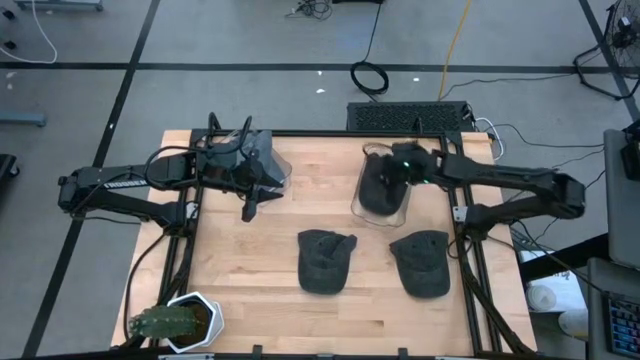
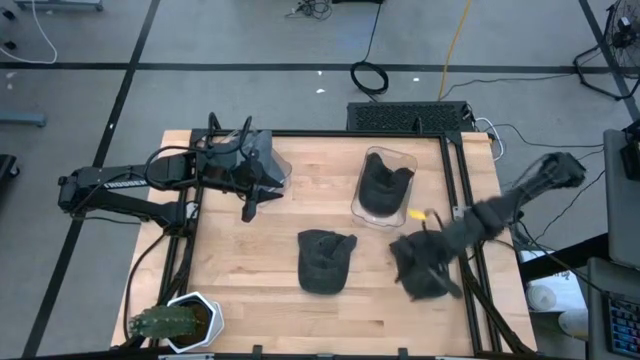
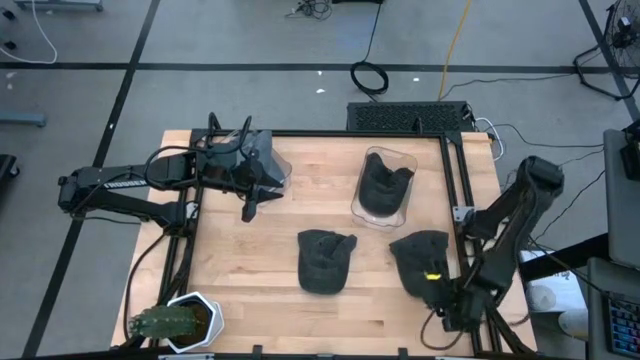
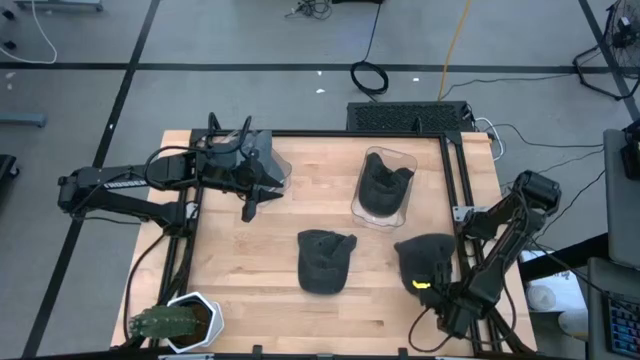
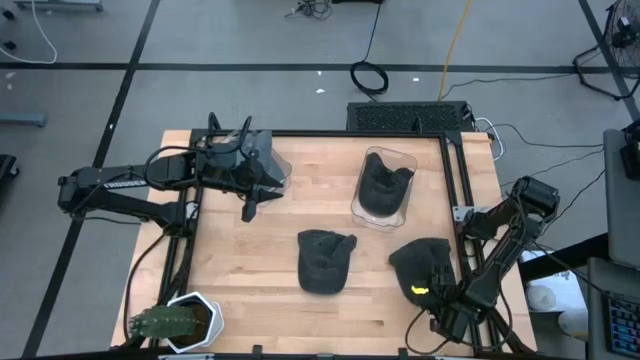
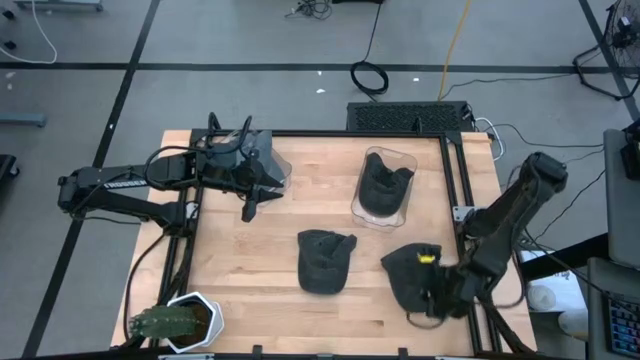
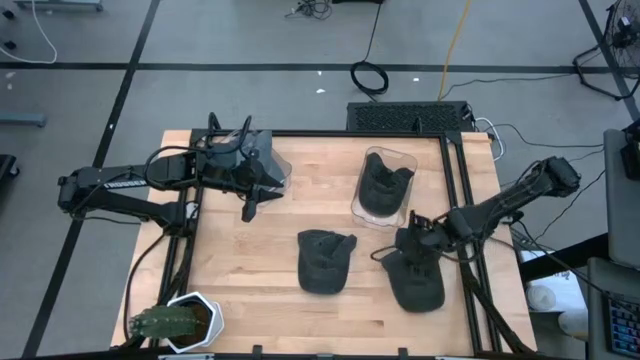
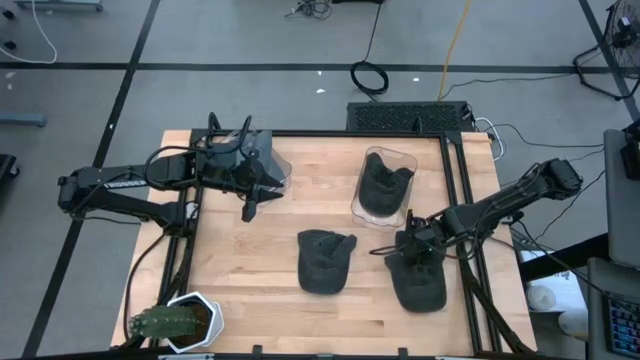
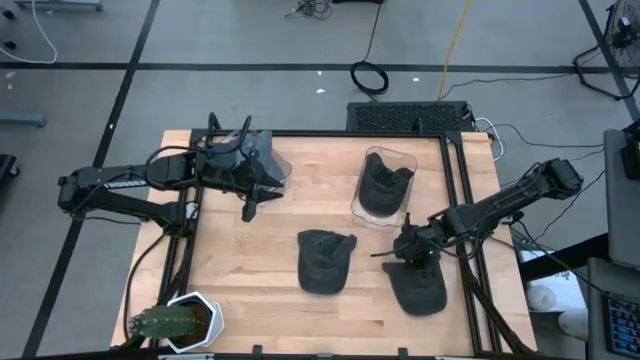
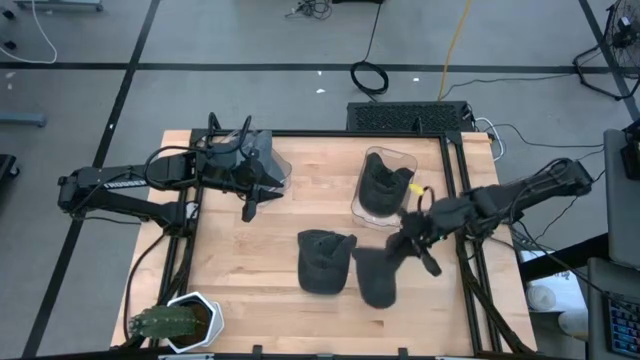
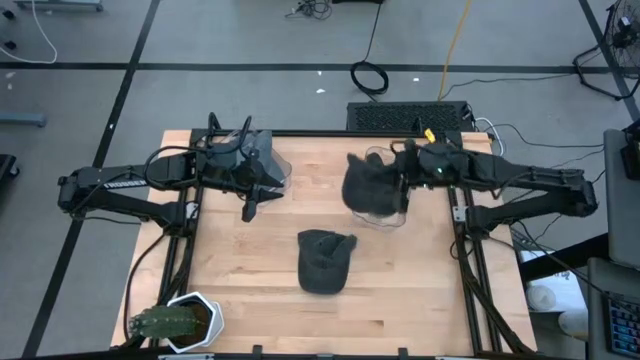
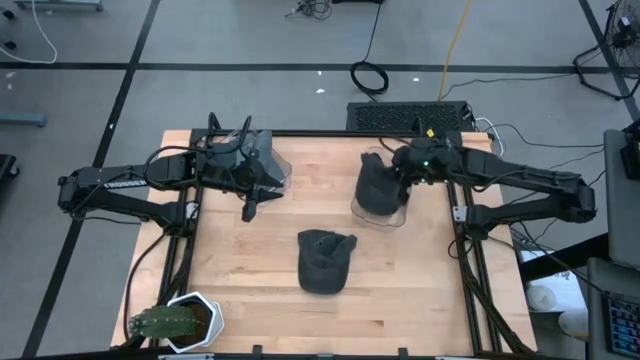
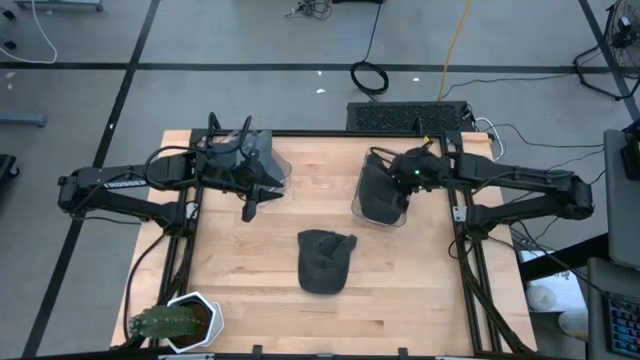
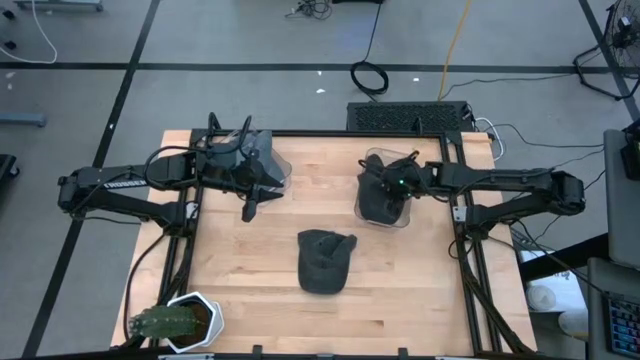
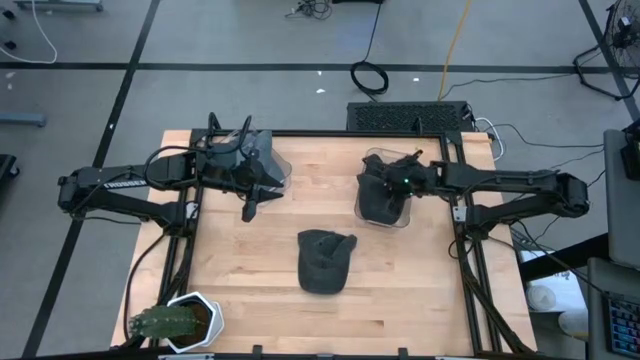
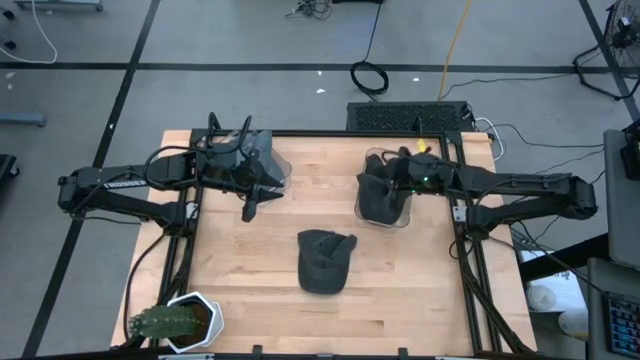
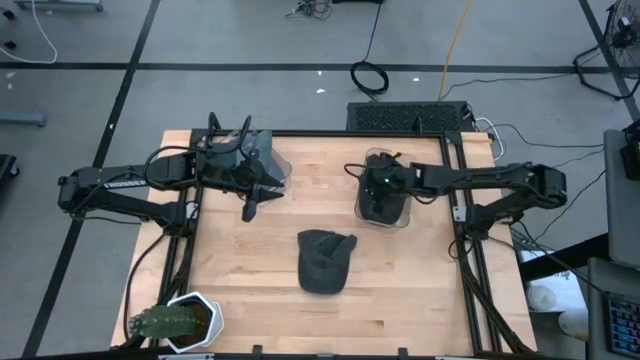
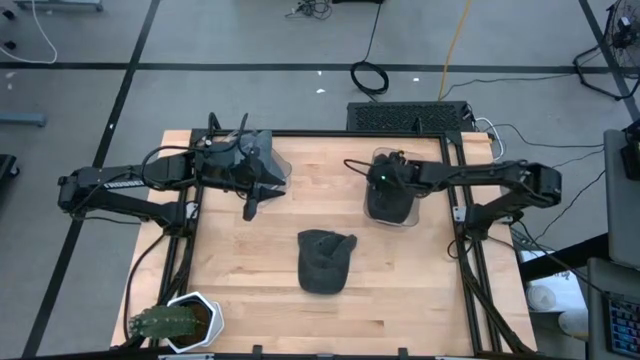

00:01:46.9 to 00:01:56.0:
Task: Pick & Place hat
Put the right black cap into the right transparent bin

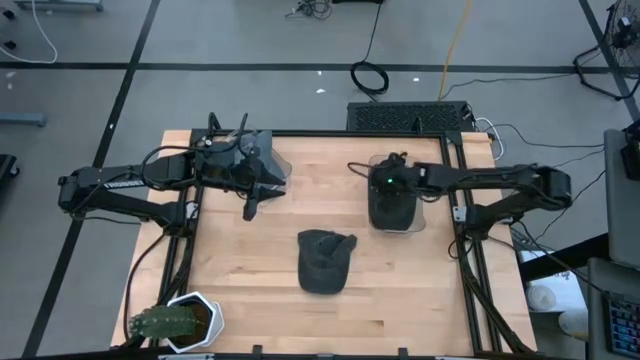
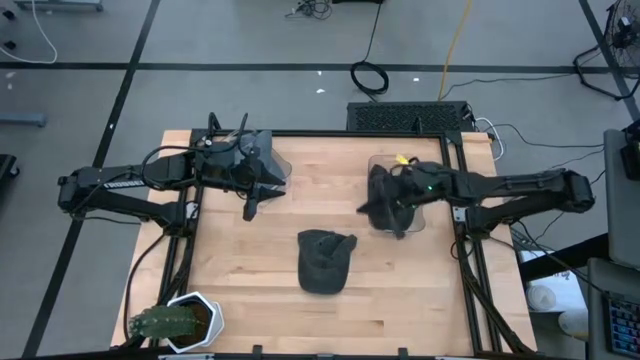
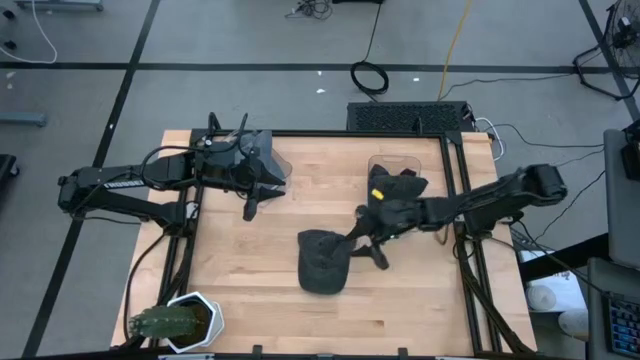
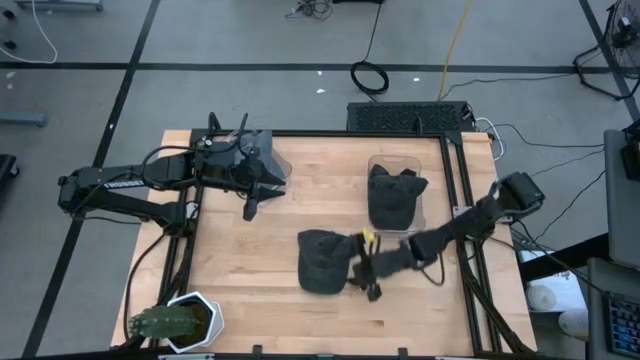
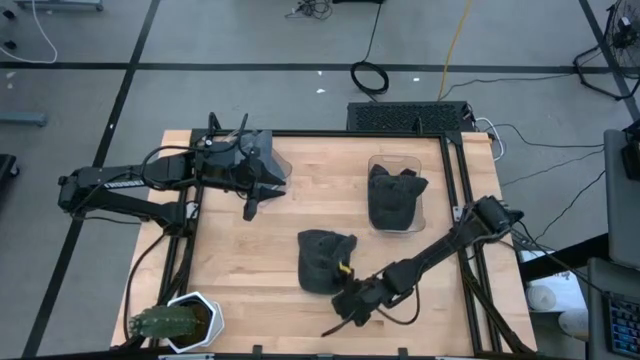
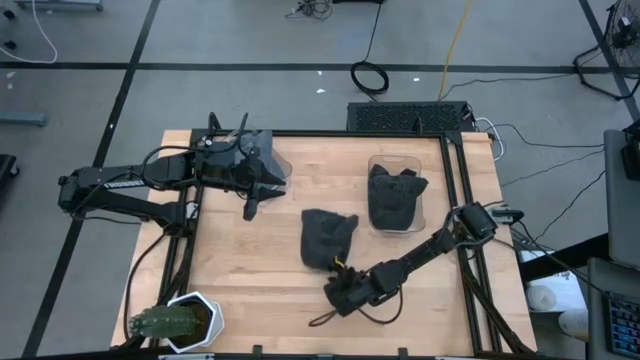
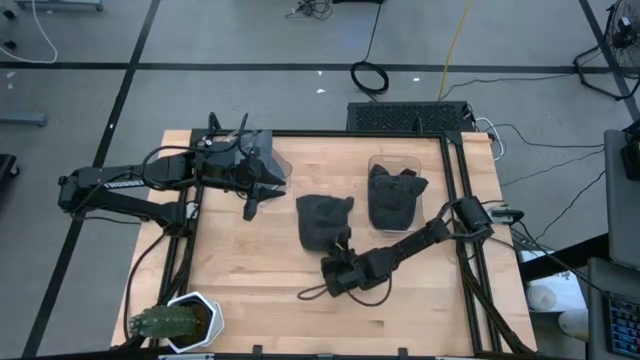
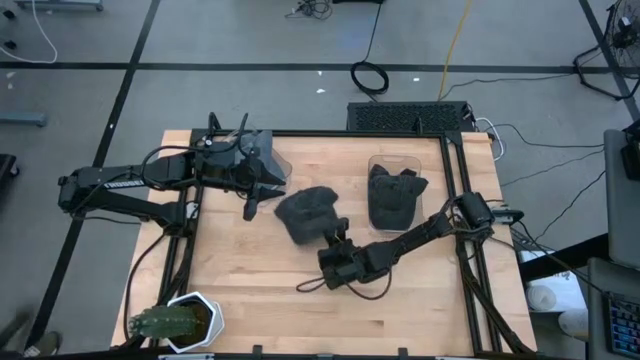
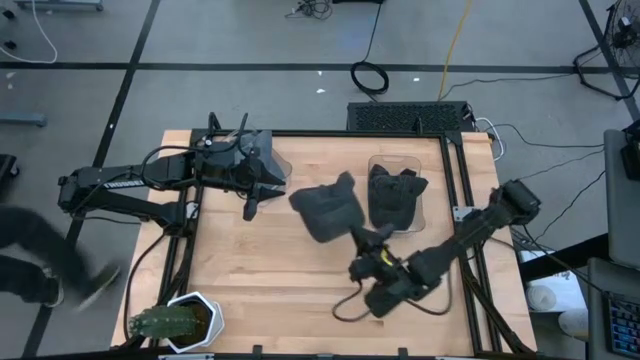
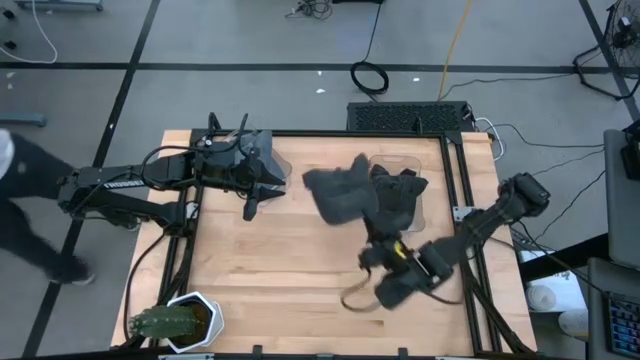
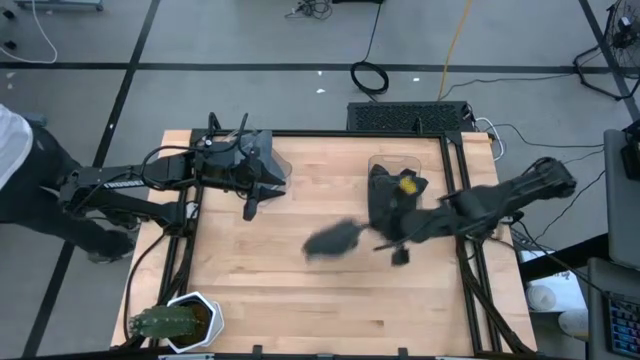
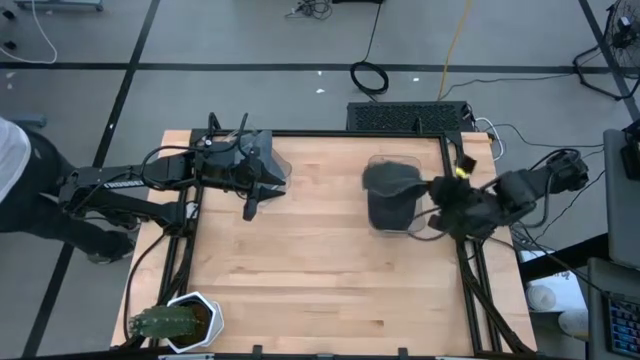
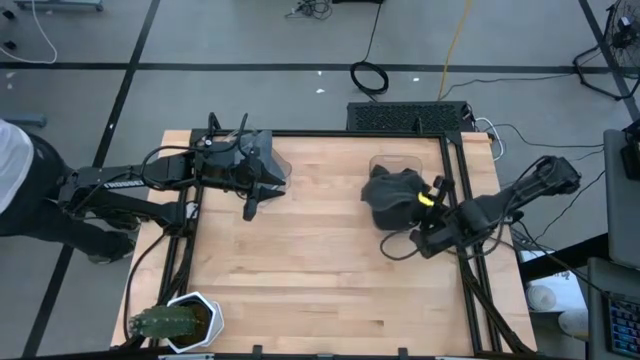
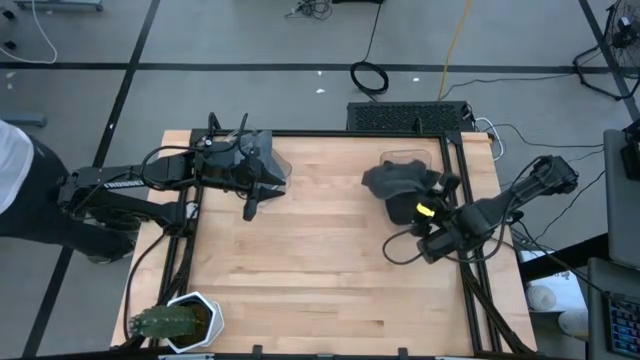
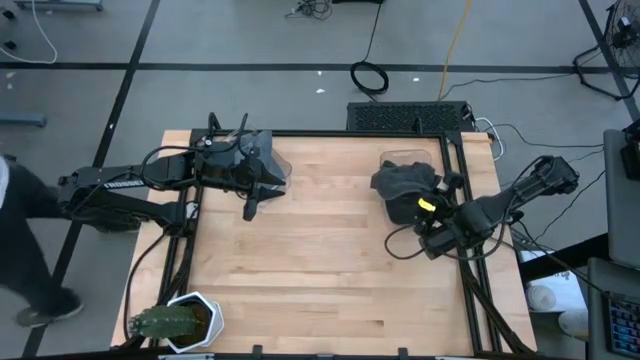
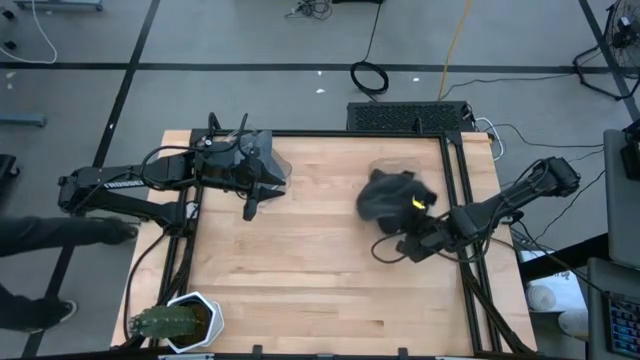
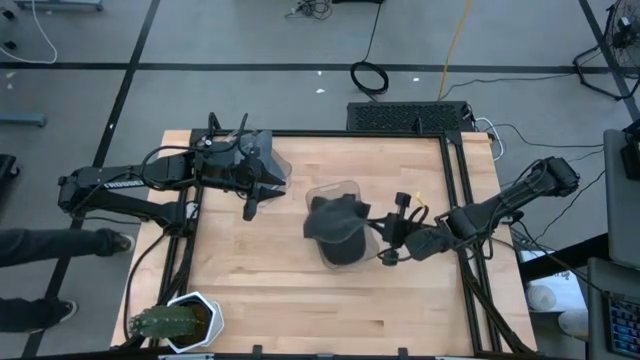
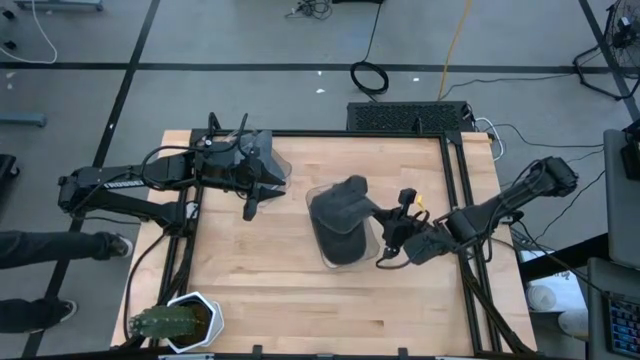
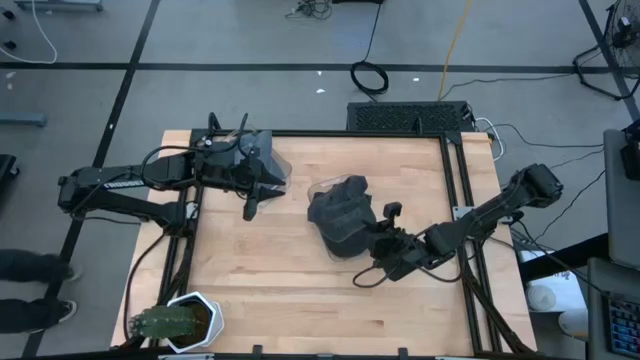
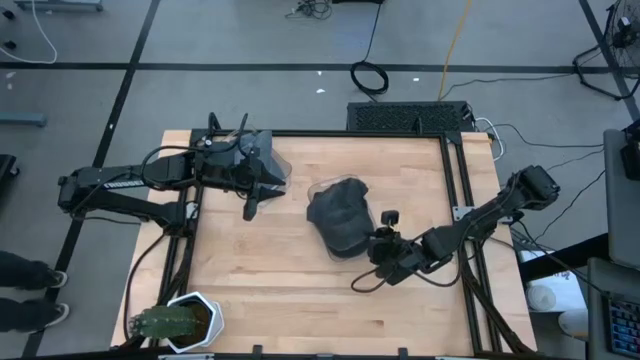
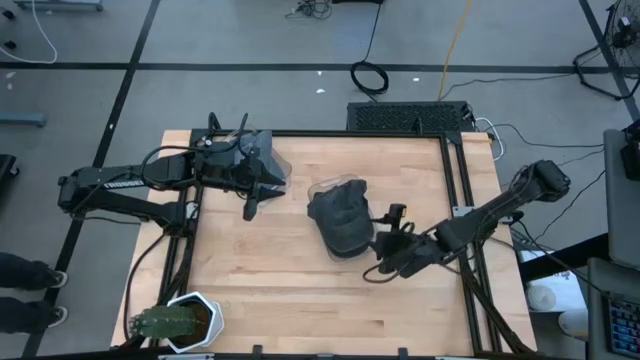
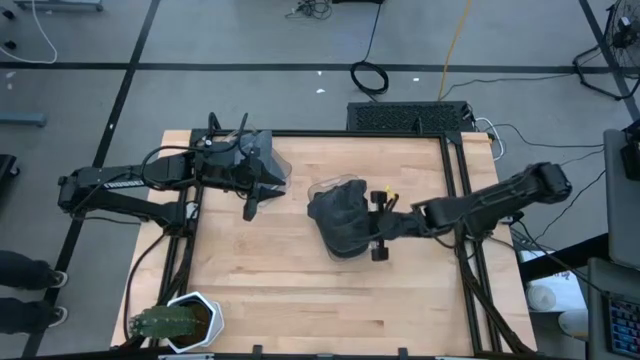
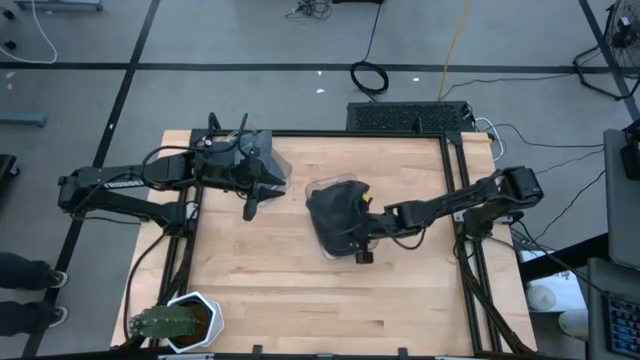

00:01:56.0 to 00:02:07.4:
Put the black cap into the right transparent bin
